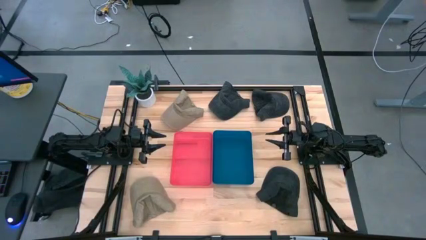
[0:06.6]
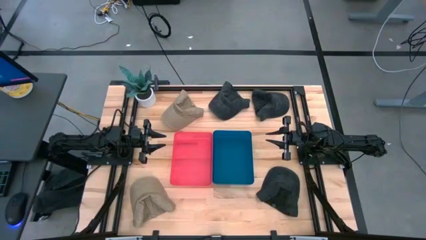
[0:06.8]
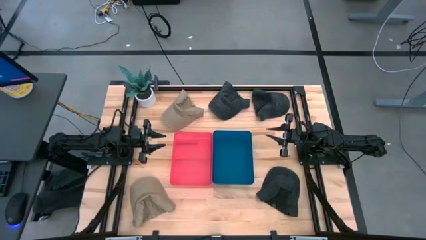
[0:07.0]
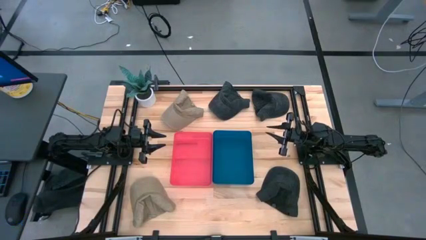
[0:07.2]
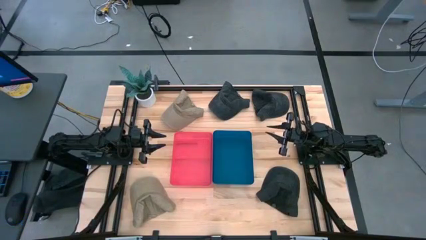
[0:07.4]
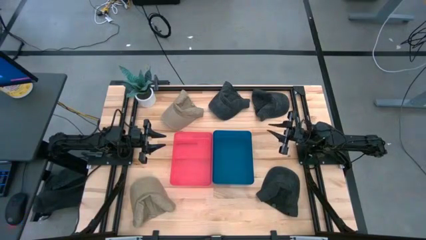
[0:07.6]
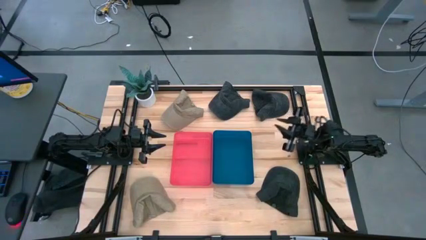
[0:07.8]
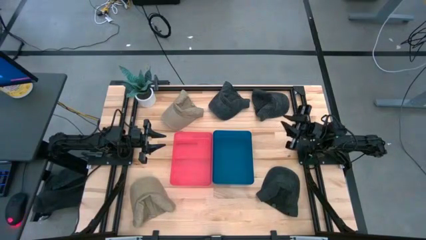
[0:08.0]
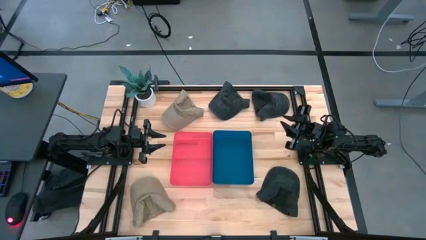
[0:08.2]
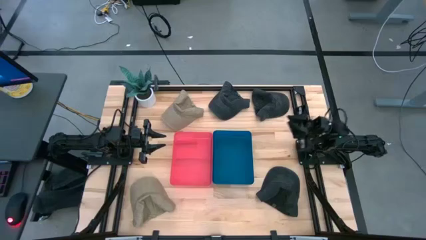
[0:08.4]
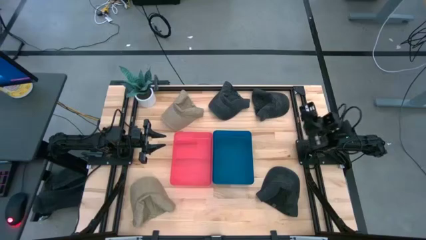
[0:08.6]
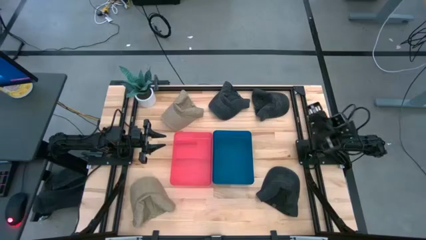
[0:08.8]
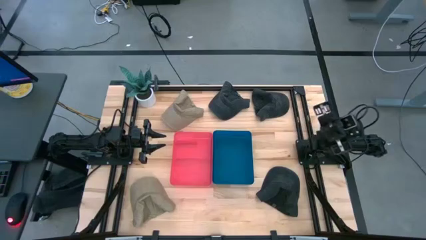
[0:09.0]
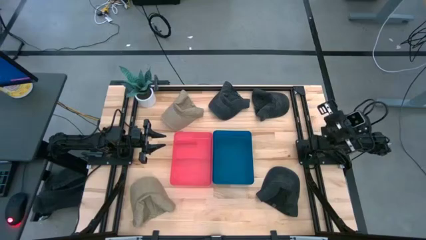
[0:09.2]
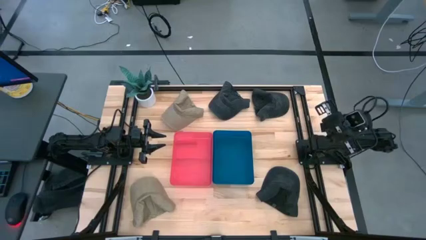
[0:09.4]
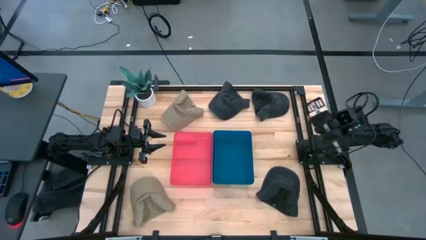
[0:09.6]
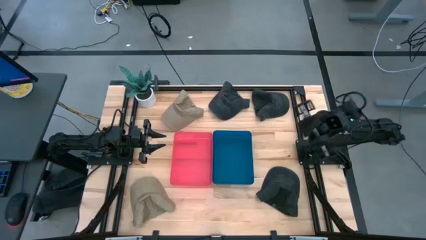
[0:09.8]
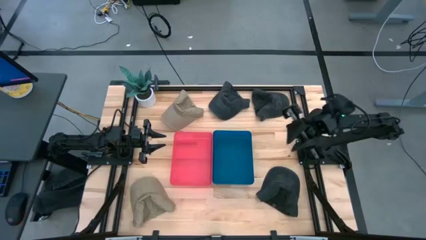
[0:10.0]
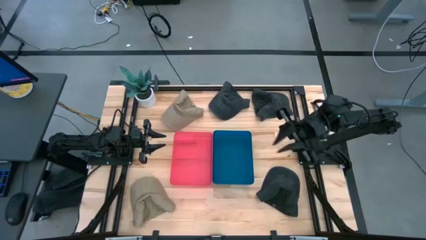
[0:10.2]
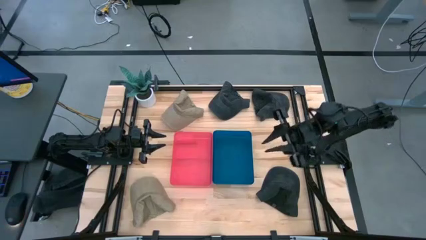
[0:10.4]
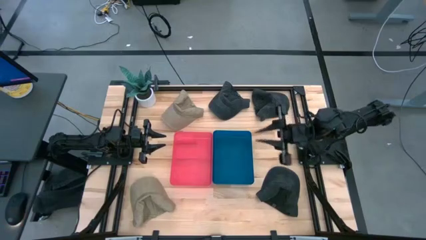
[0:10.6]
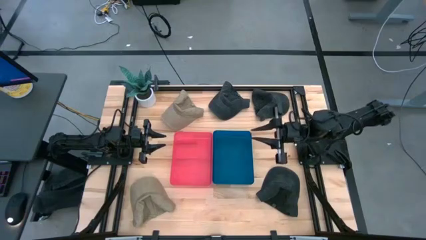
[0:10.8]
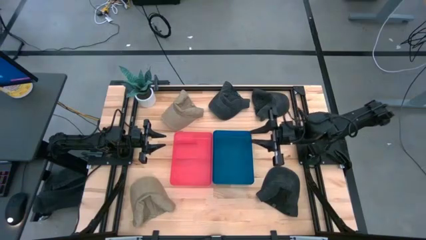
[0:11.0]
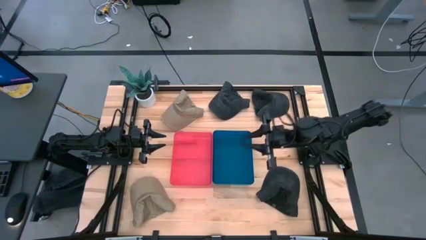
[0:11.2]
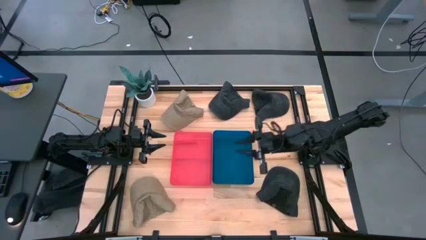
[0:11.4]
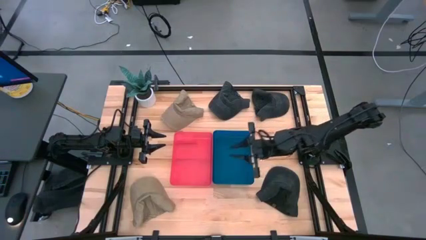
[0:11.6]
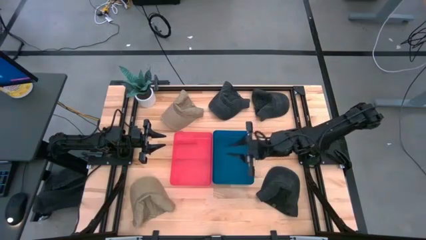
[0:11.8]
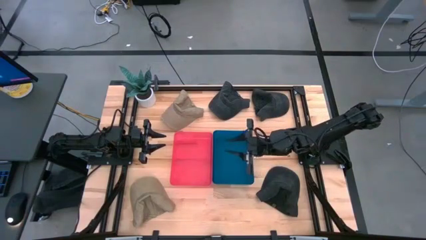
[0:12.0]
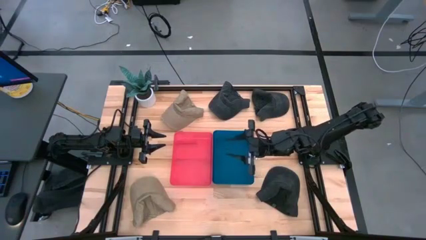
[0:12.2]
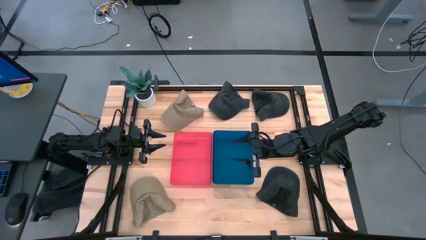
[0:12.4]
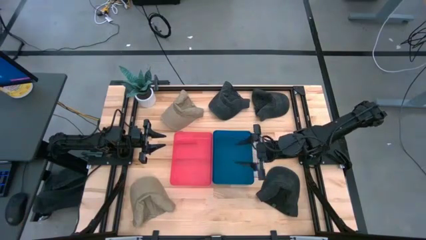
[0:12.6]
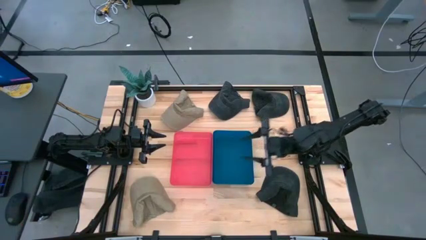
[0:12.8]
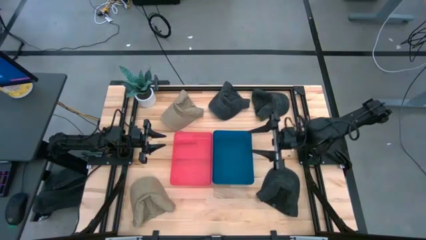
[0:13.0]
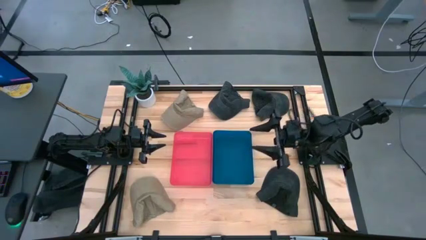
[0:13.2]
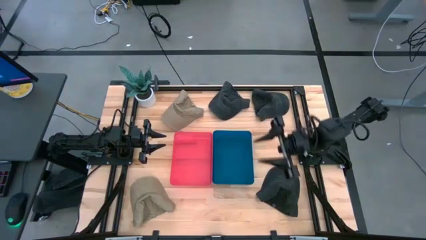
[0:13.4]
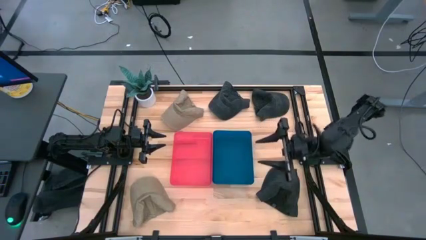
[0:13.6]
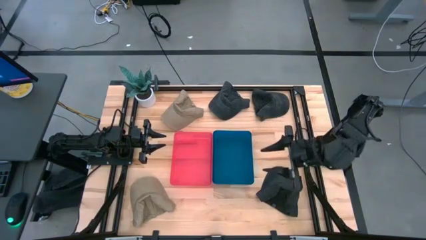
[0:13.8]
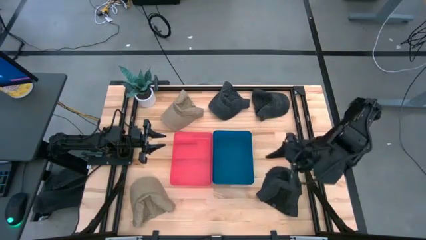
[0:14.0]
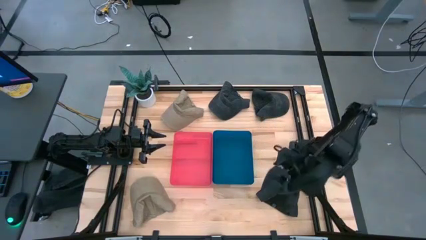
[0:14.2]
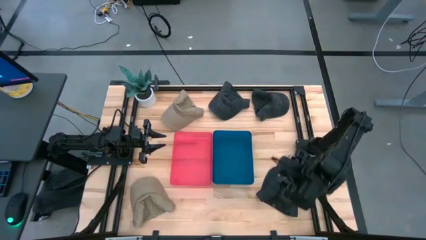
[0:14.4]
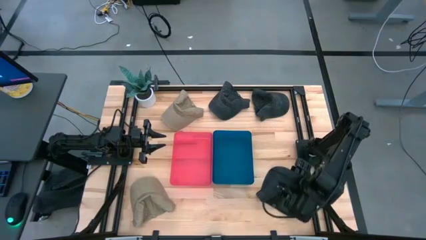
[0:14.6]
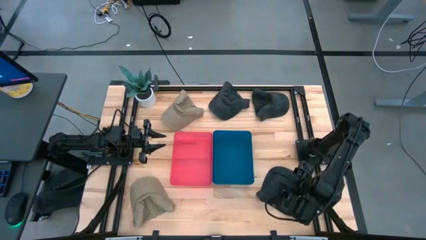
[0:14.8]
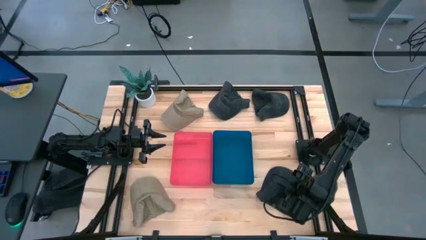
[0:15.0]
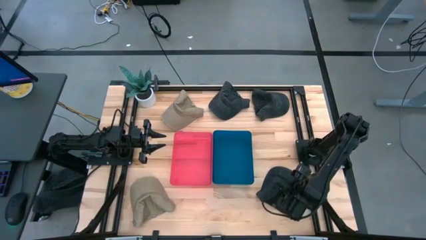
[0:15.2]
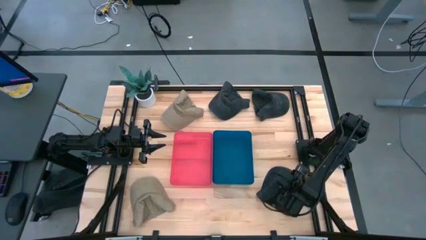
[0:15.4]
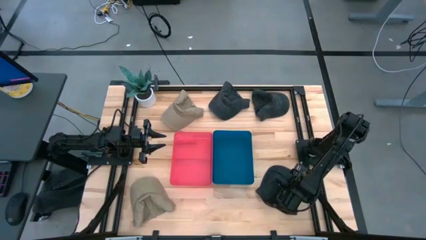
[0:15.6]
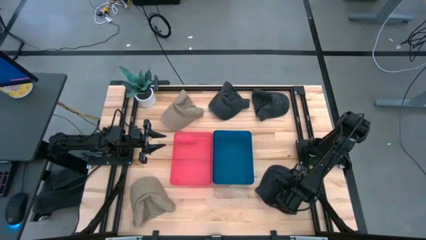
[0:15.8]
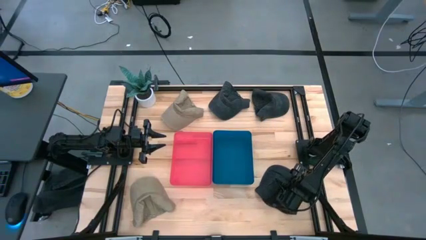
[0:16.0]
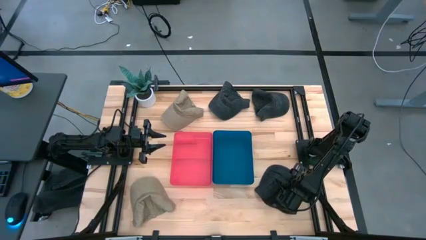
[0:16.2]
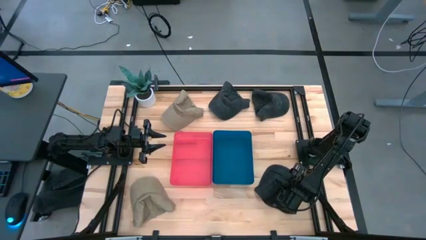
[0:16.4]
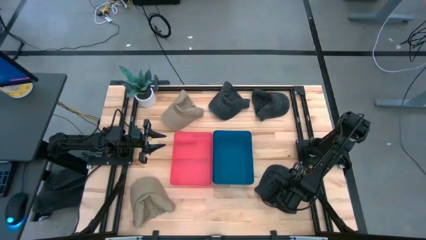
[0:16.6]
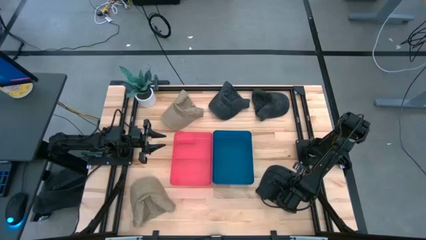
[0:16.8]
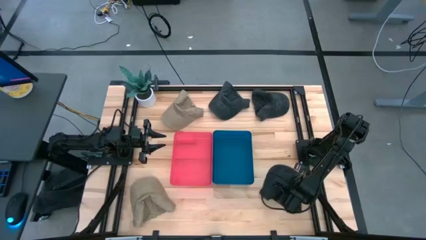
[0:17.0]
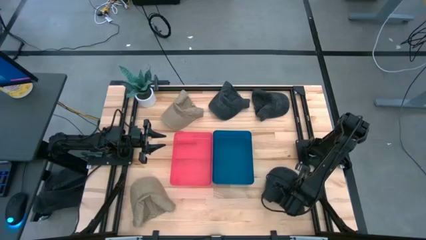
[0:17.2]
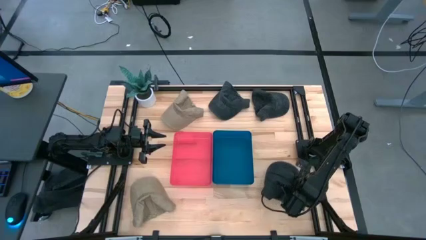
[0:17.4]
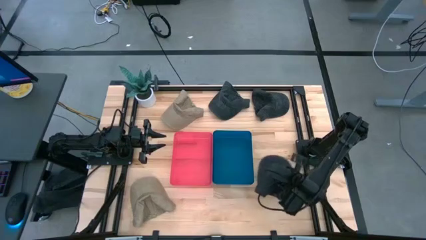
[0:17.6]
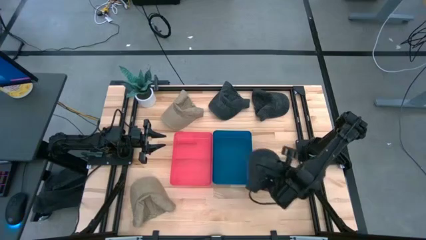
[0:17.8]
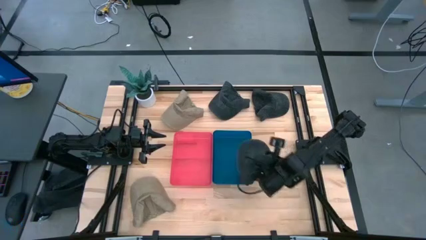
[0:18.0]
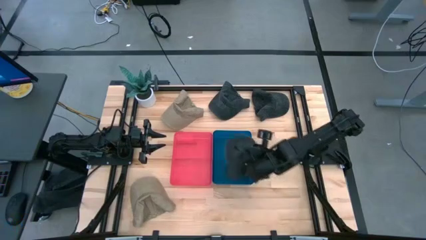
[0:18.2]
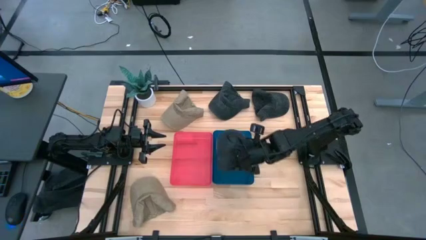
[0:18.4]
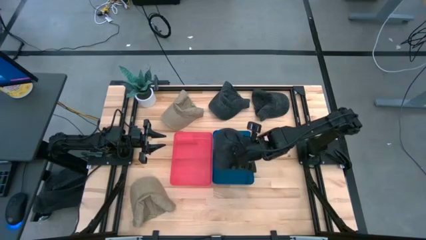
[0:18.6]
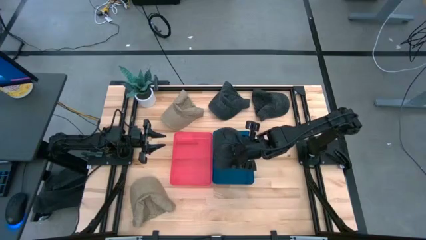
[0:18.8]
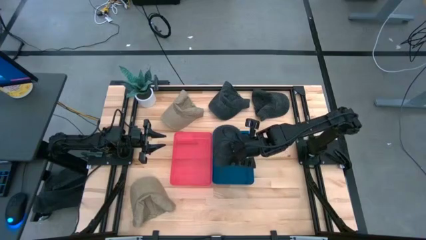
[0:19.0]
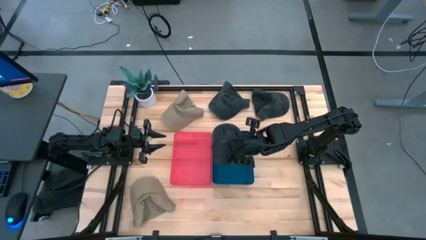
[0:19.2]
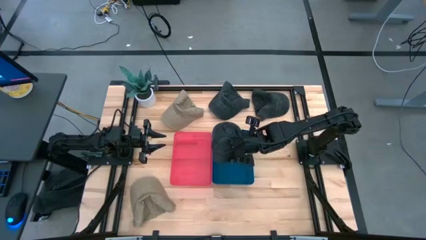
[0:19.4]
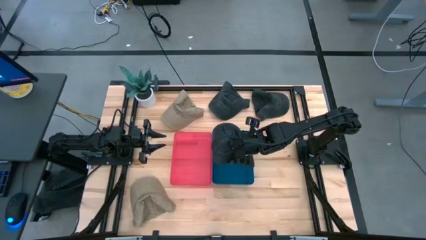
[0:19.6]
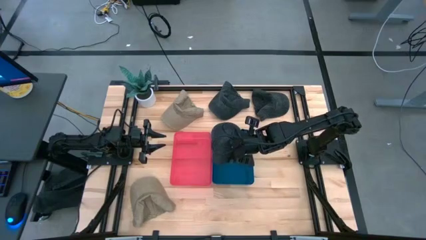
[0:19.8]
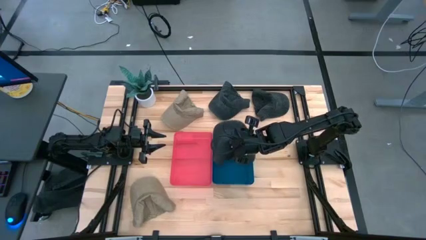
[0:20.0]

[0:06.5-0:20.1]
Task: Pick & Place hat
Put the bottom right black cap into the blue bin
